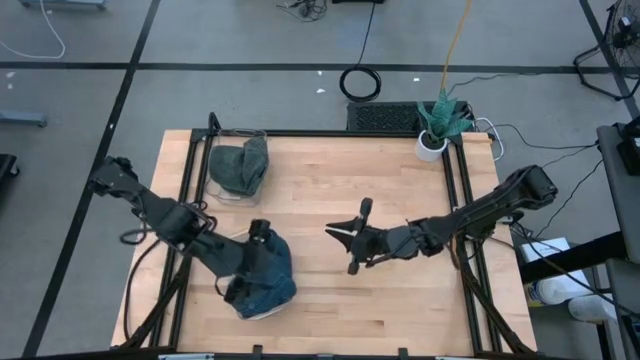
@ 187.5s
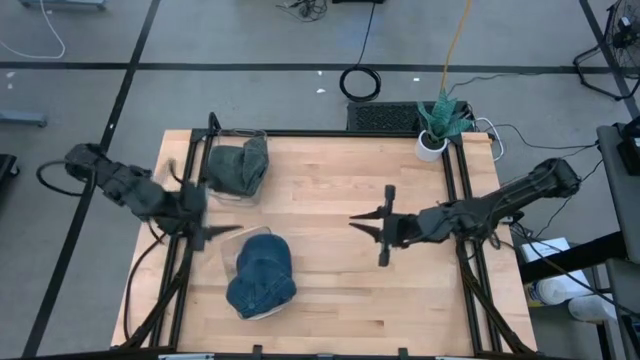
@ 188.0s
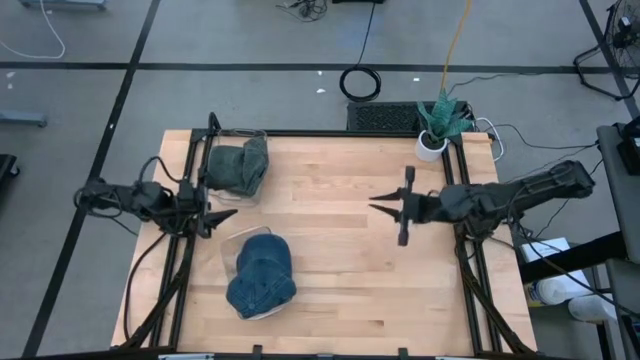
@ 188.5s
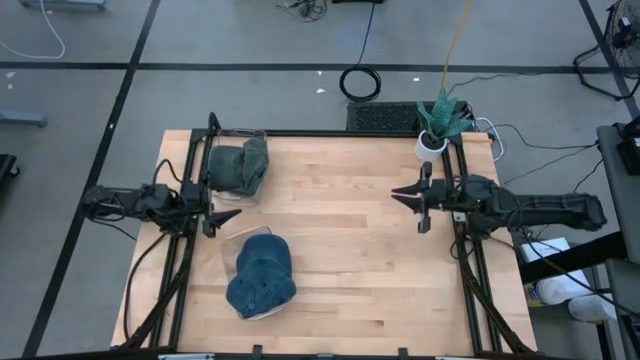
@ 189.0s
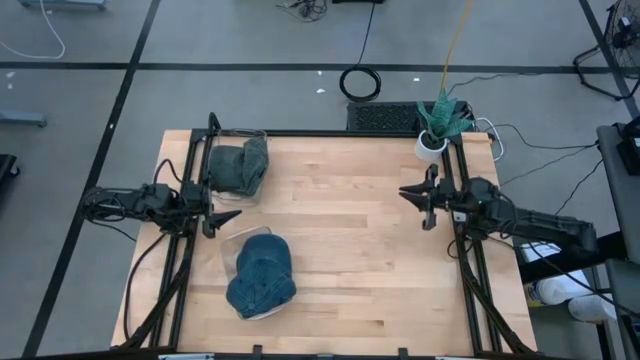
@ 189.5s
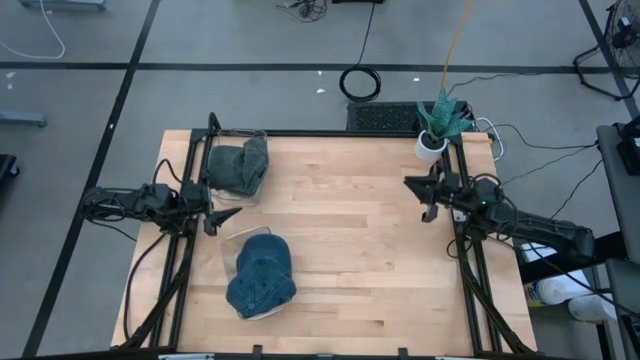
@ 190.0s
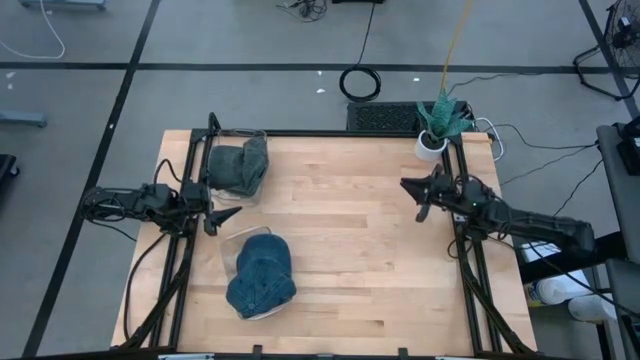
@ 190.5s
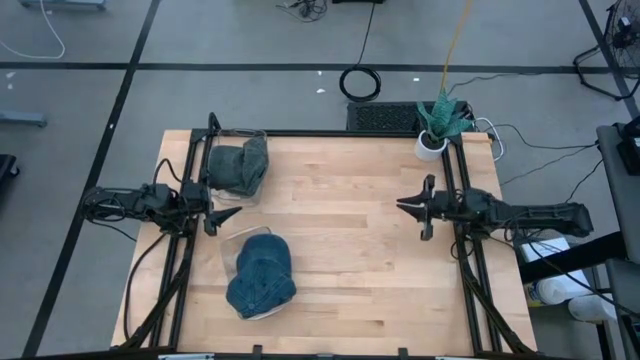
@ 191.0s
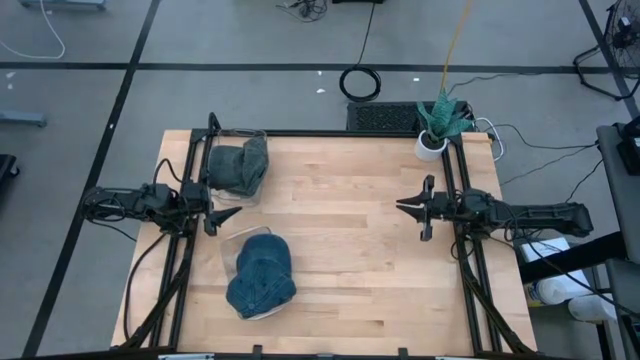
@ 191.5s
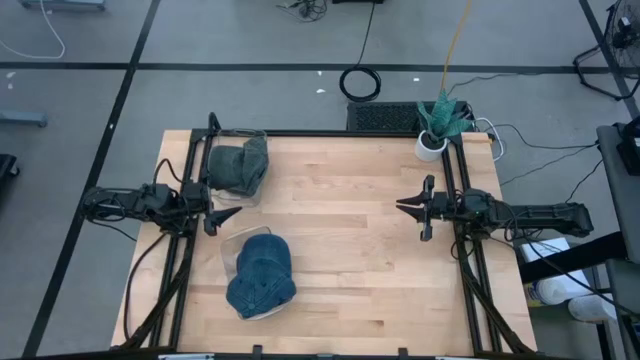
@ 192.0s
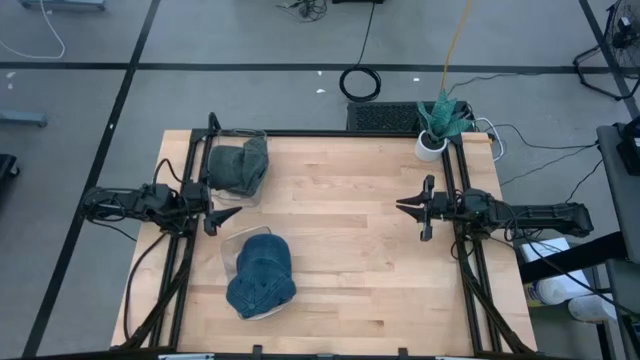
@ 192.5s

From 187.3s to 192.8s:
Task: Pick & Place hat
Return to Home Position

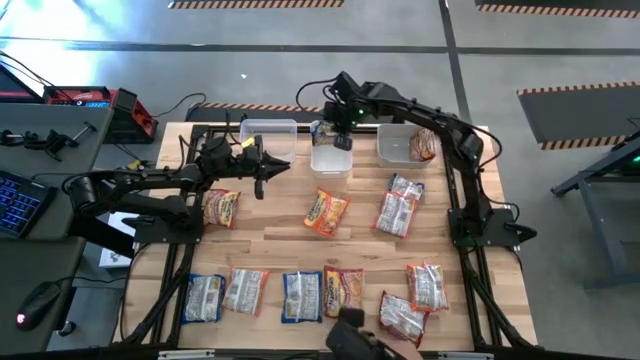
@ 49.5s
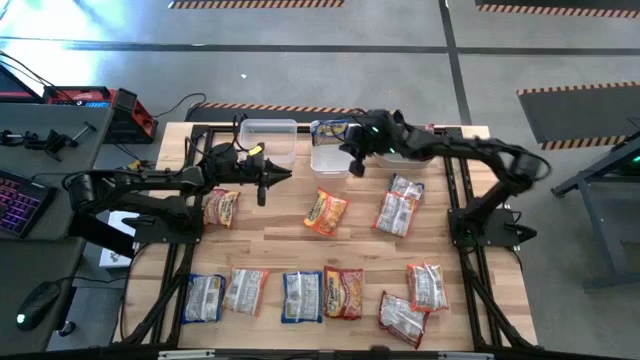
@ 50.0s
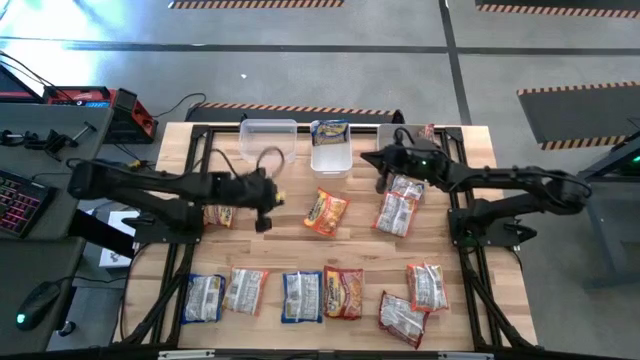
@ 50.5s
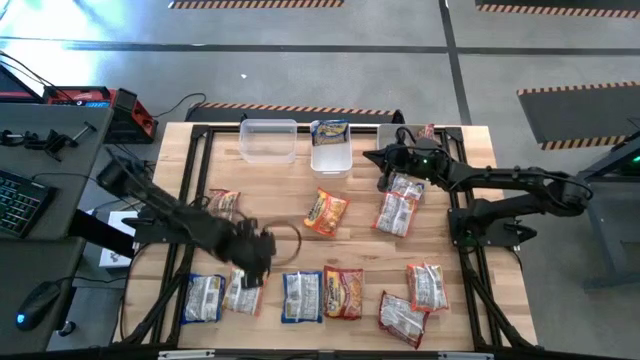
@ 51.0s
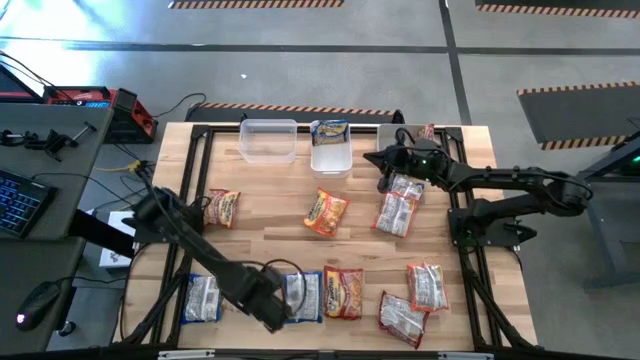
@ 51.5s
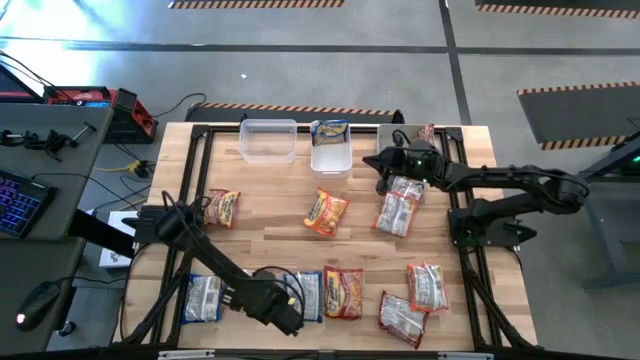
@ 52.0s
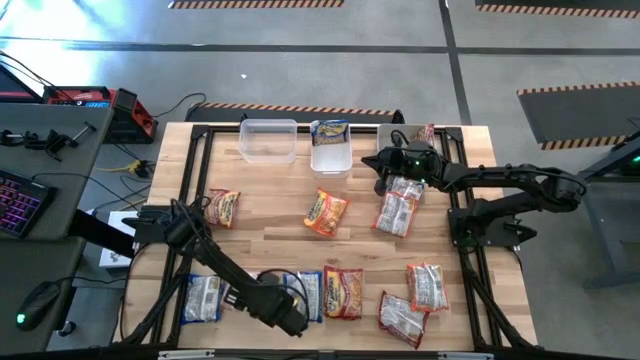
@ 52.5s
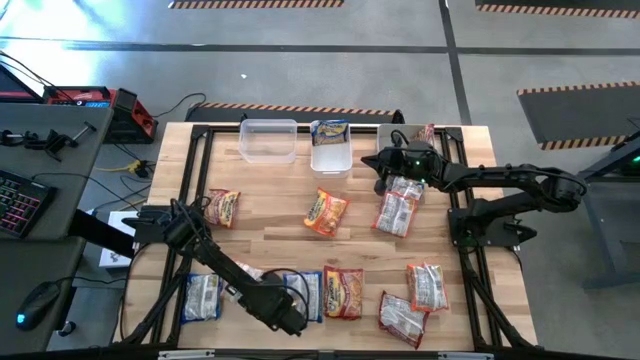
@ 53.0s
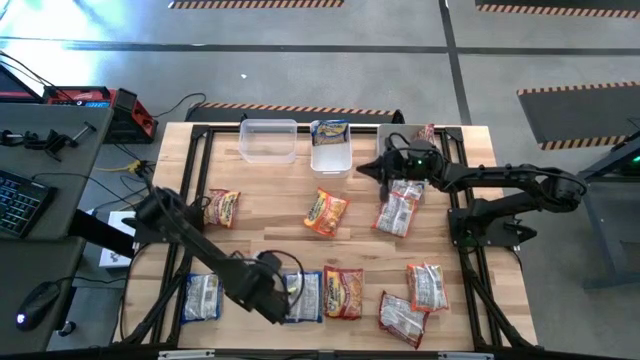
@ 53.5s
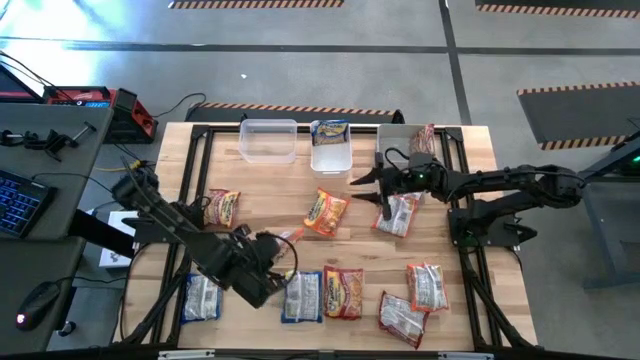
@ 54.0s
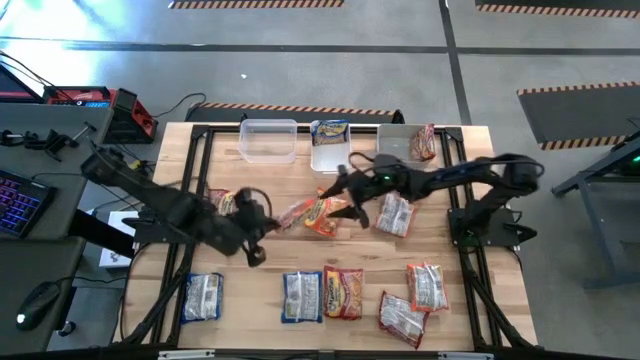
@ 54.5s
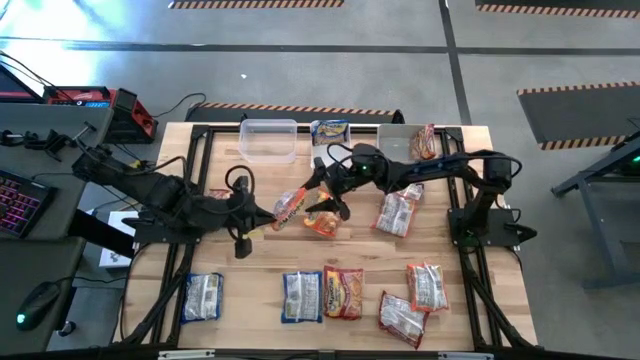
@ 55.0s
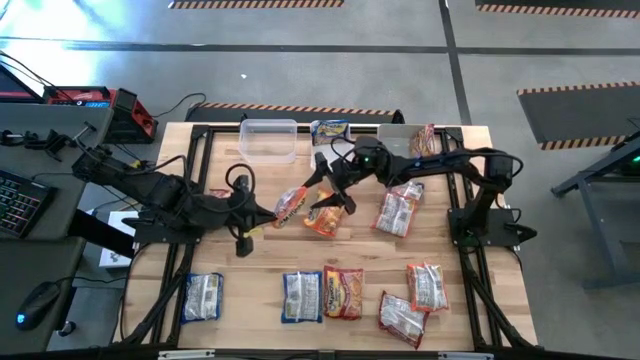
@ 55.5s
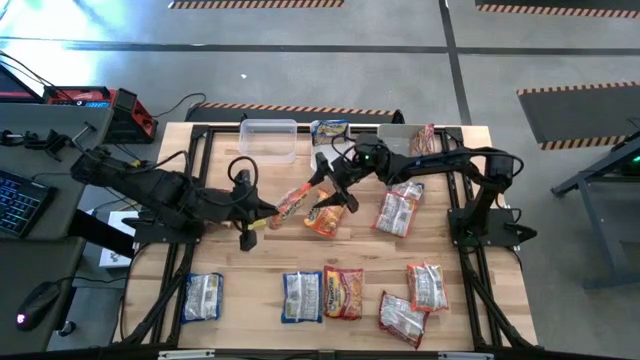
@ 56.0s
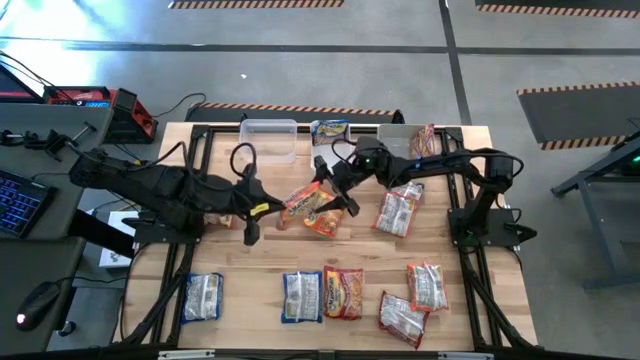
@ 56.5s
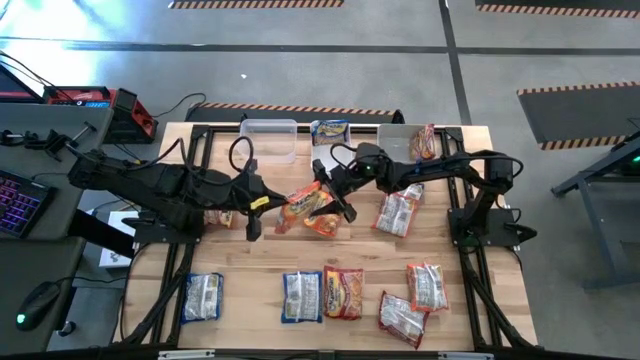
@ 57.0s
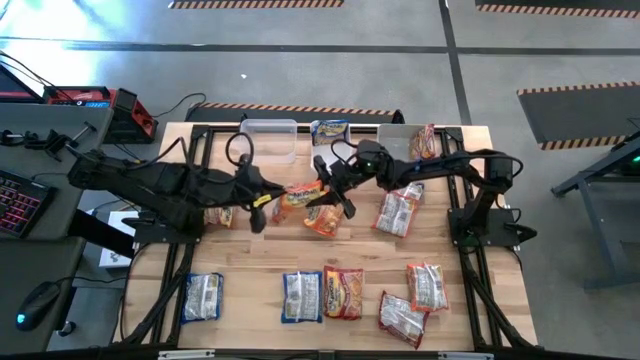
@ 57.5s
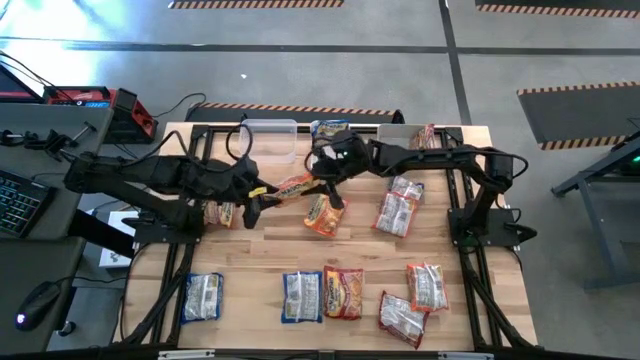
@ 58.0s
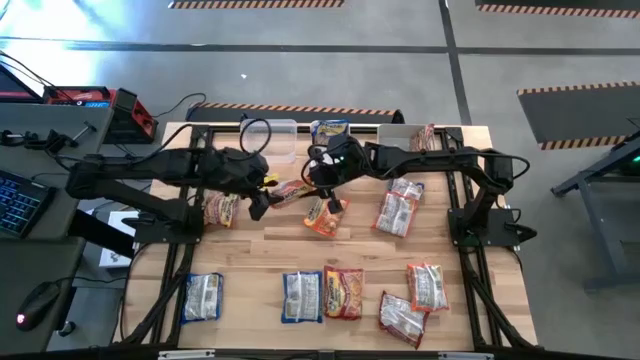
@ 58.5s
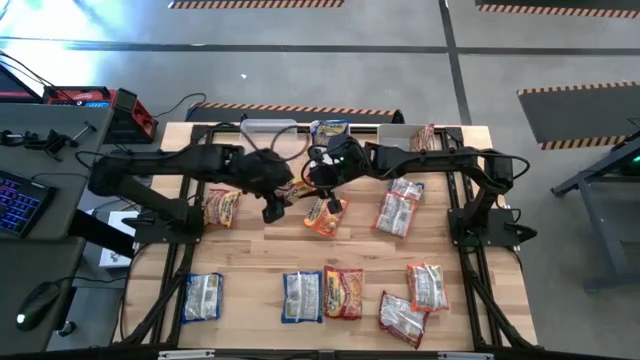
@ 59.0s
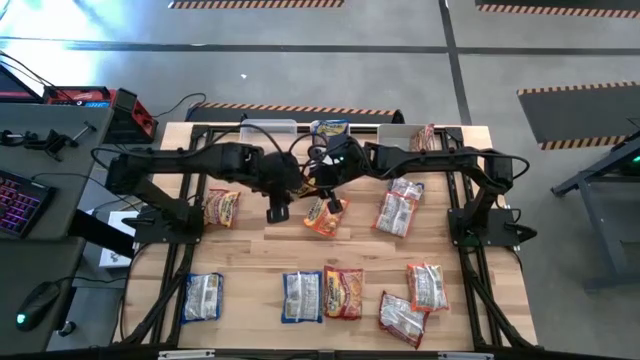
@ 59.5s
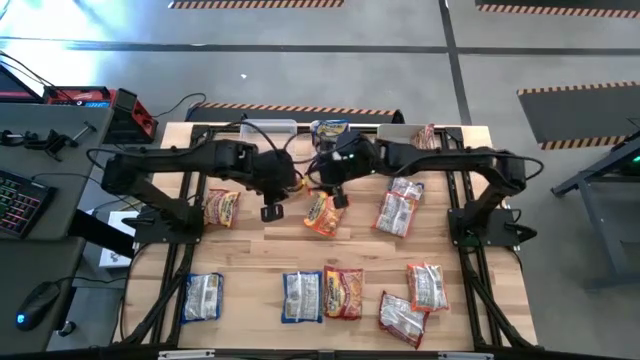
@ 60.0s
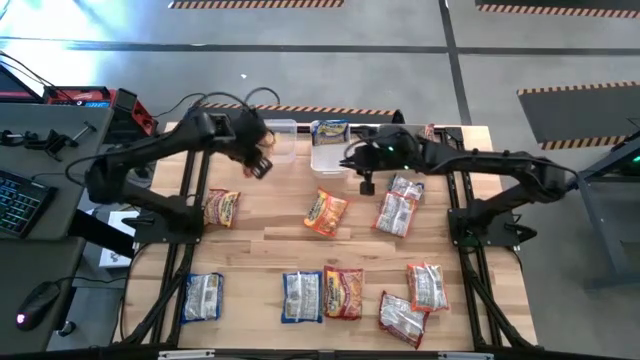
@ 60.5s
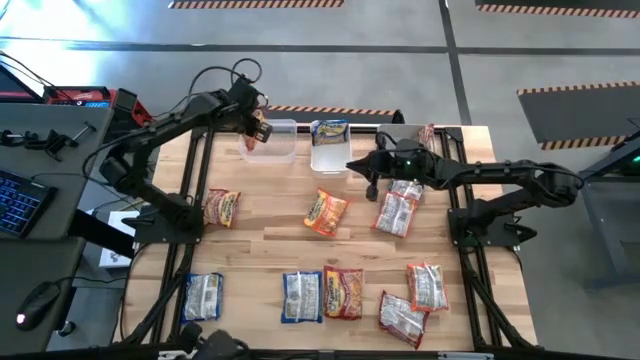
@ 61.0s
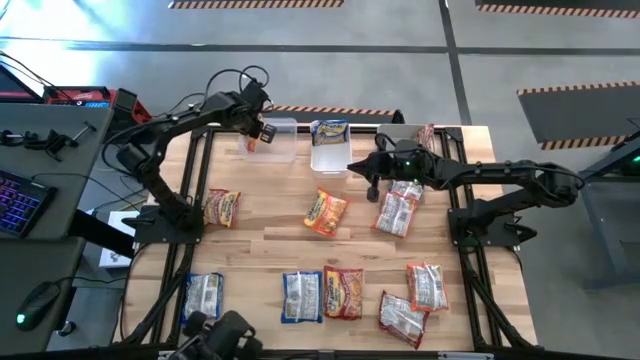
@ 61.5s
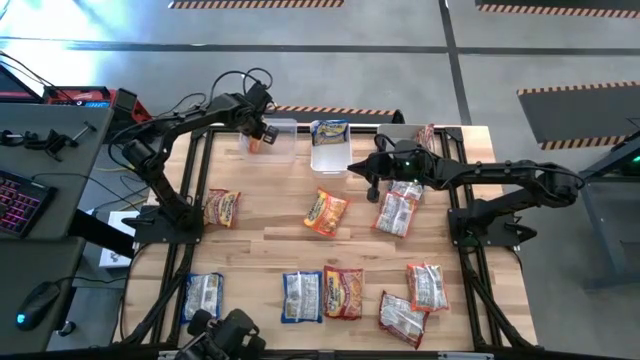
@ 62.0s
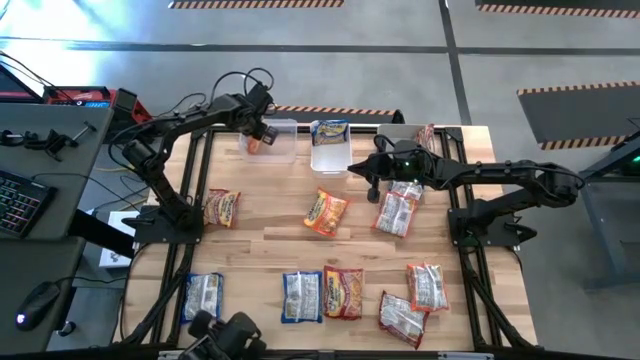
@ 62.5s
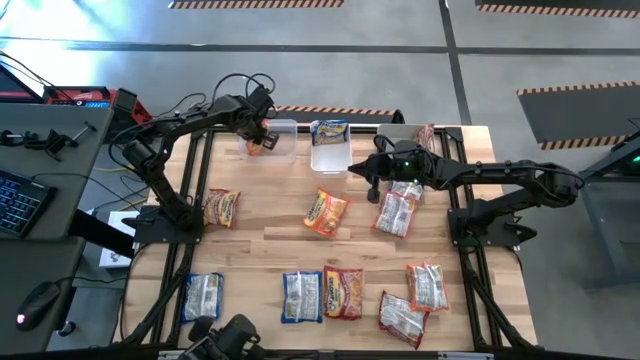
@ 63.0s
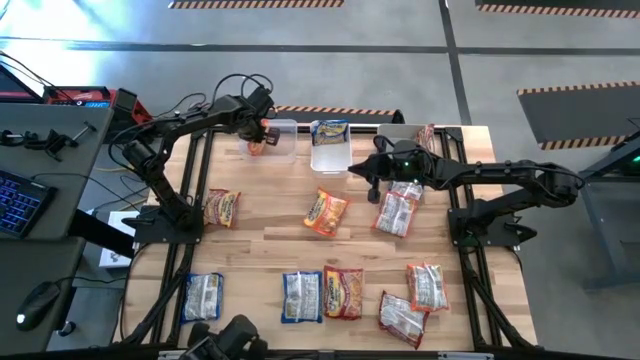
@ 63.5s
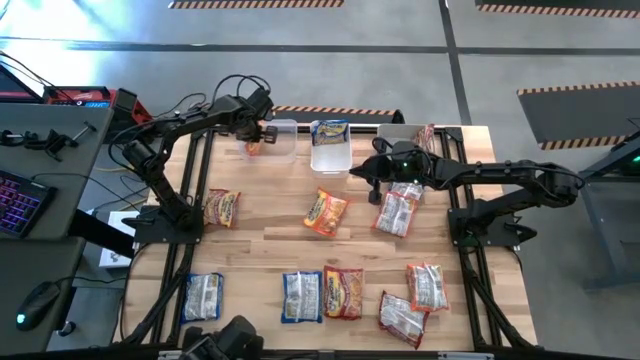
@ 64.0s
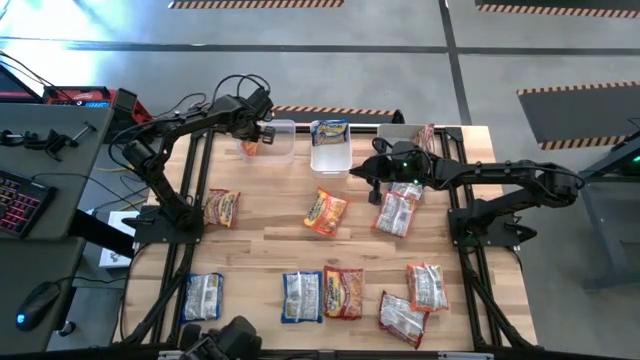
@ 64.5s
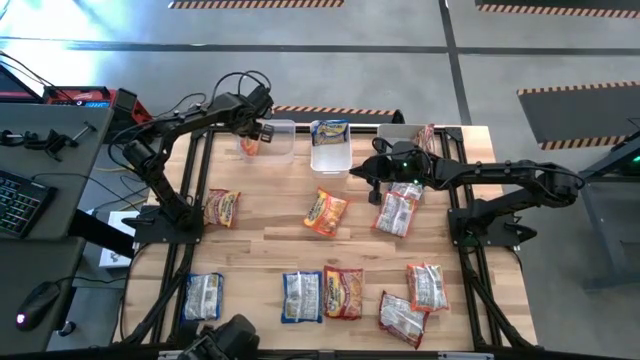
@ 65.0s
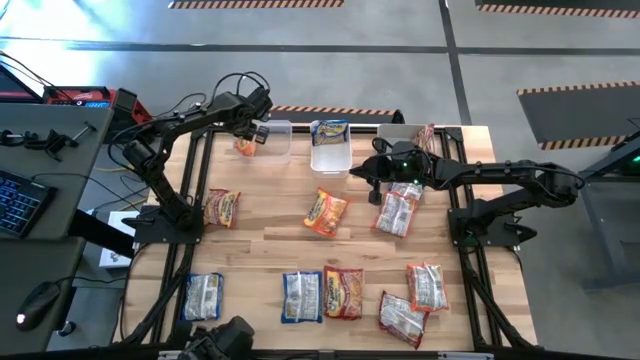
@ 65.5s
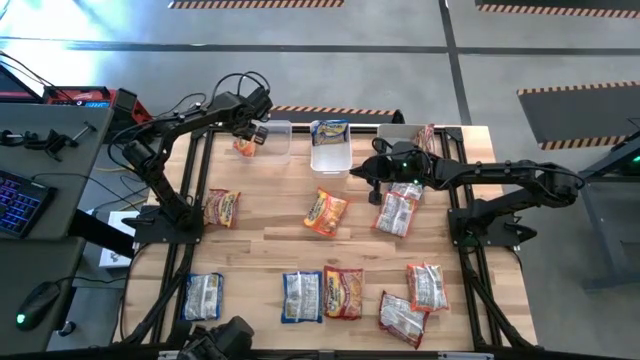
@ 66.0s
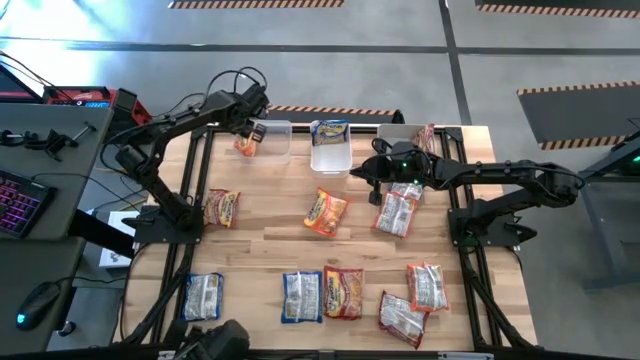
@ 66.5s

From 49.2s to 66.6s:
Task: Sort Maruchan noodles
Put the orange noodle pack into the transparent bin
